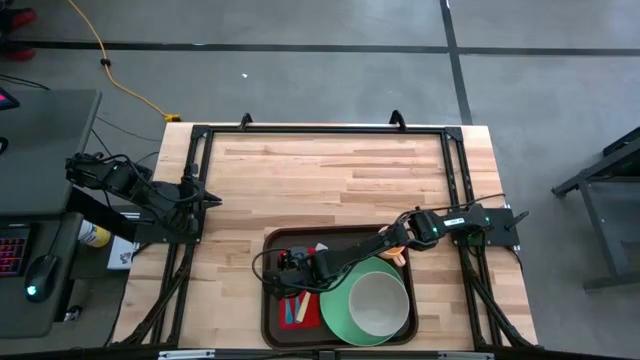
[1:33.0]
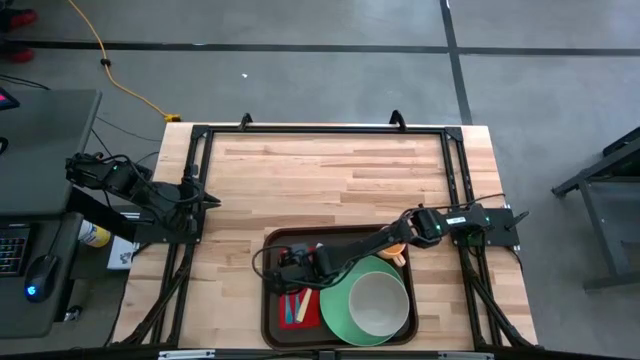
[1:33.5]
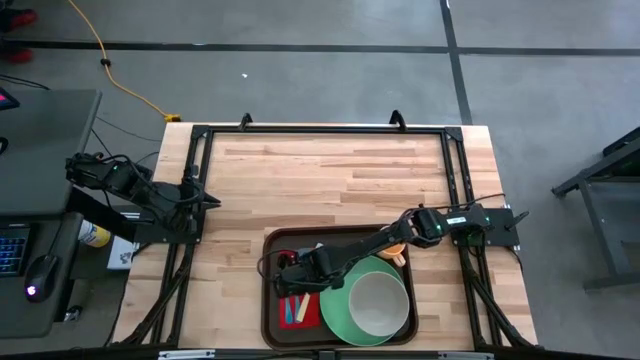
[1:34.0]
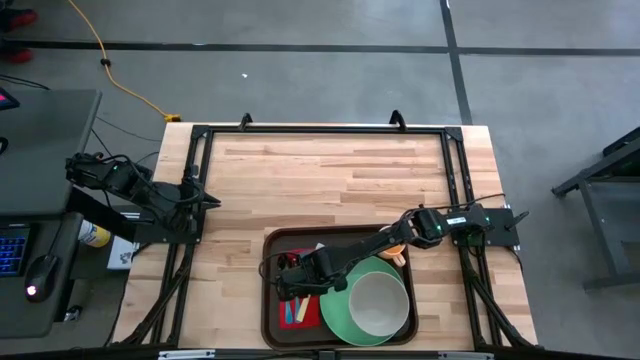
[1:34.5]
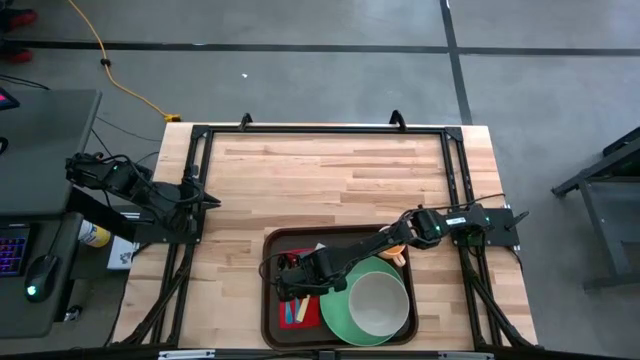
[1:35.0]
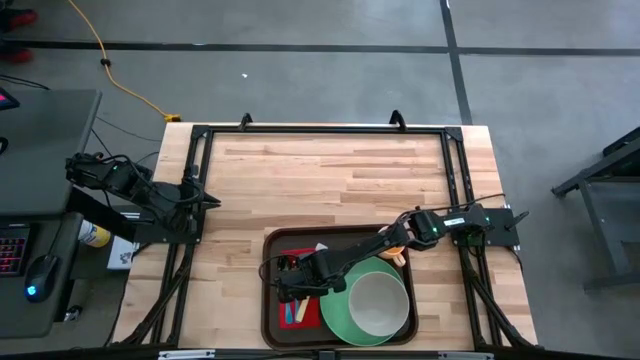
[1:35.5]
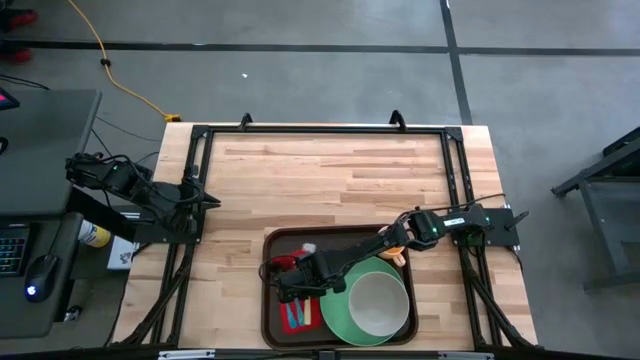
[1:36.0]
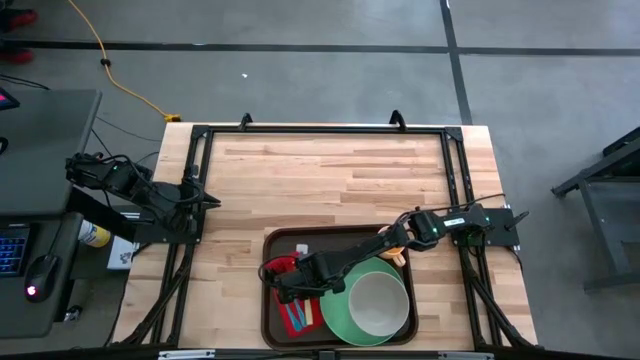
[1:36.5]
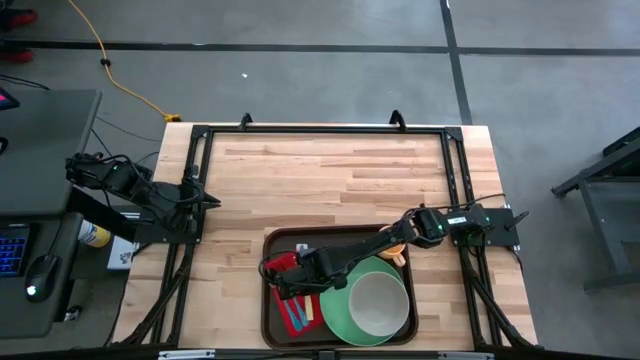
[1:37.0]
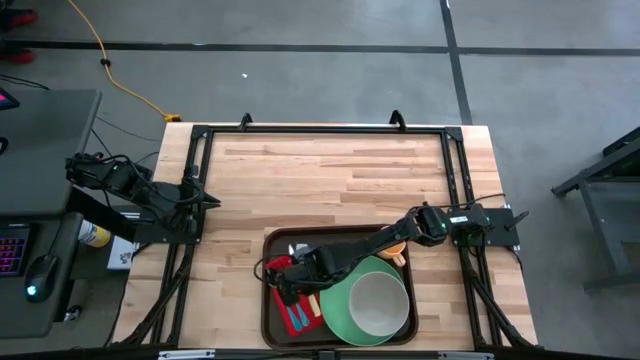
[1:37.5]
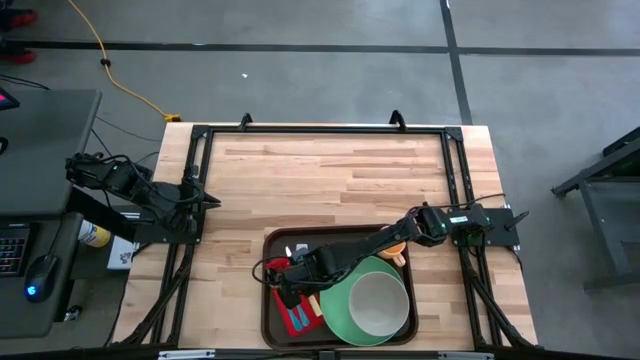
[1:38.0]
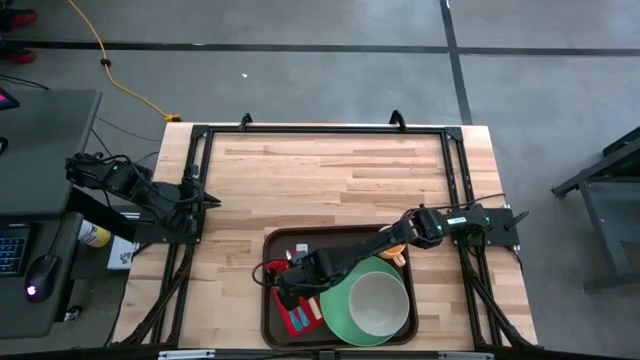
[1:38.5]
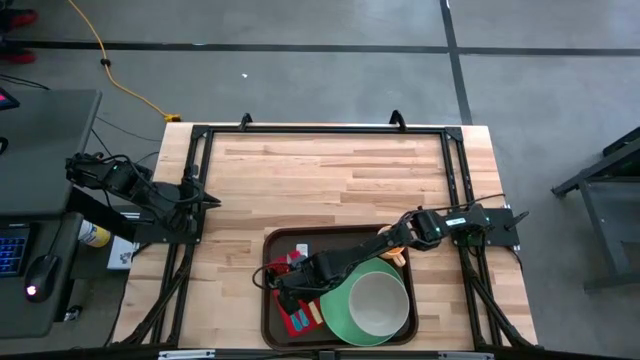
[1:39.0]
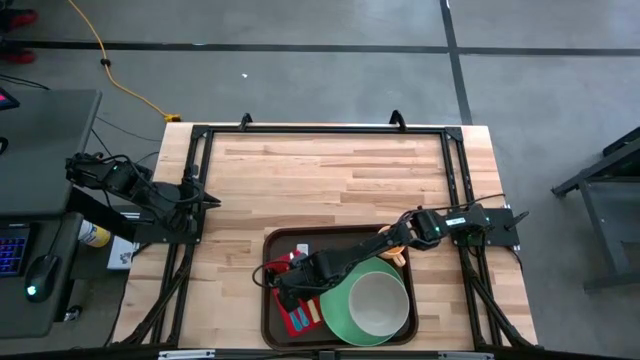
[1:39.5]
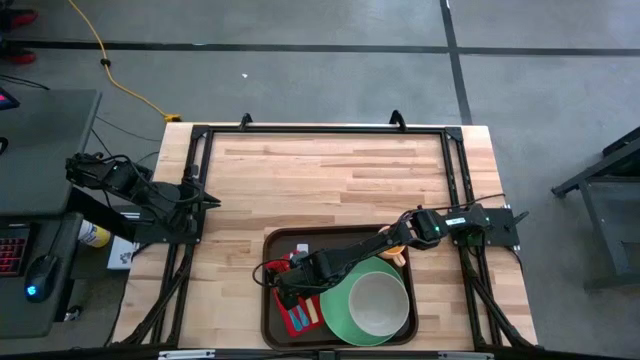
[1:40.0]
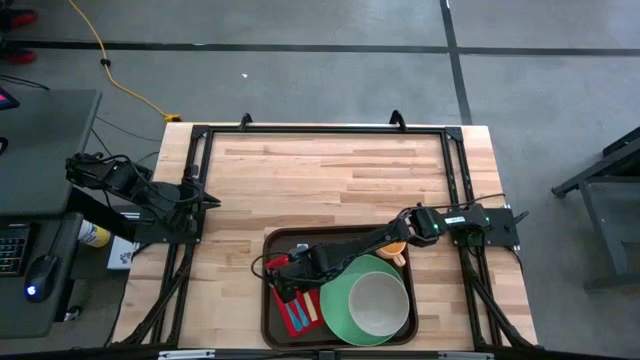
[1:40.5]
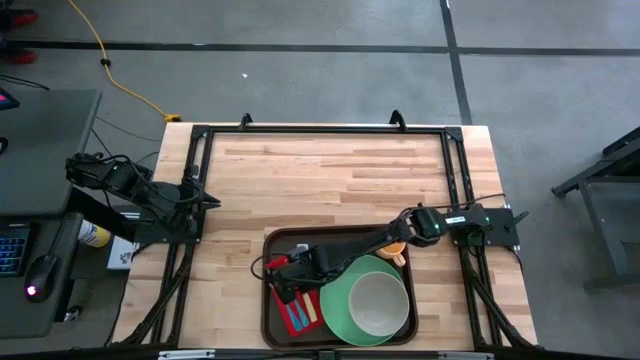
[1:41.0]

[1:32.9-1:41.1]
Task: Set up tray
Adjust the yellow knife on the red napkin

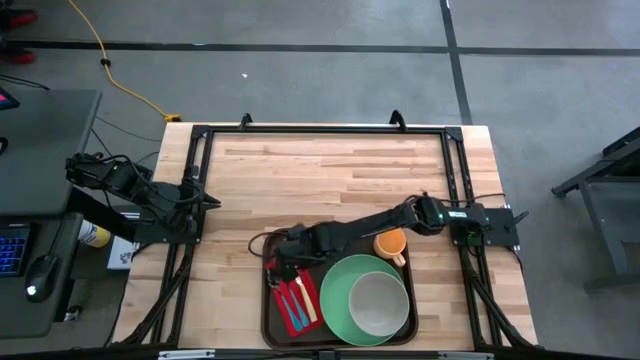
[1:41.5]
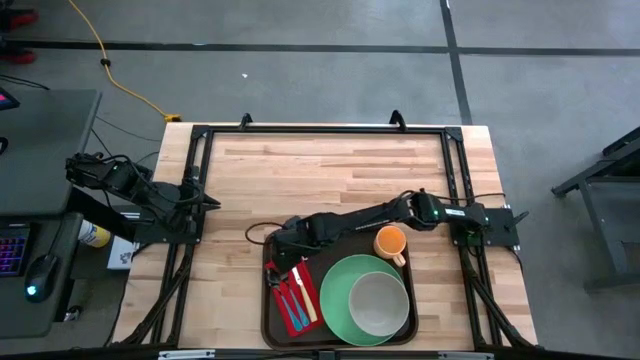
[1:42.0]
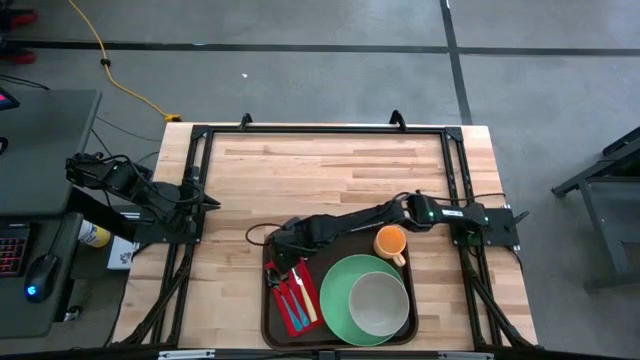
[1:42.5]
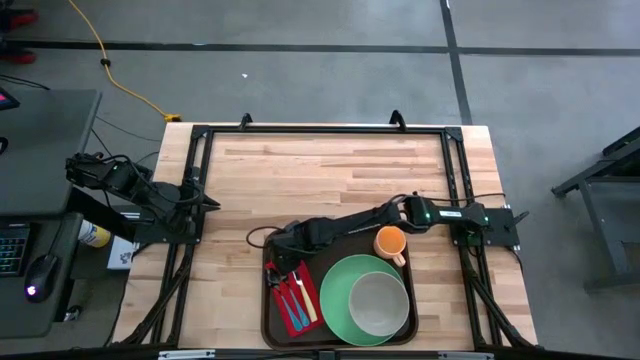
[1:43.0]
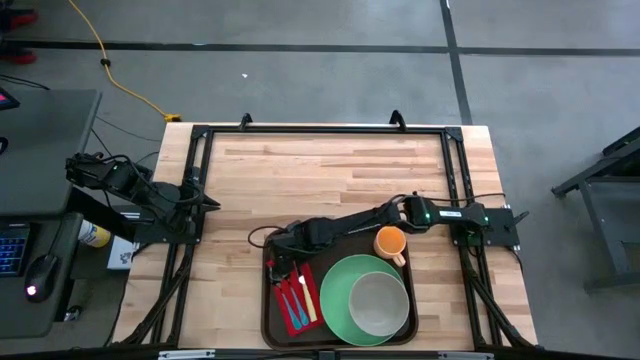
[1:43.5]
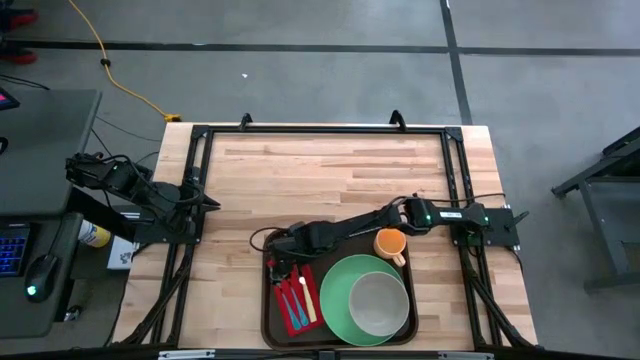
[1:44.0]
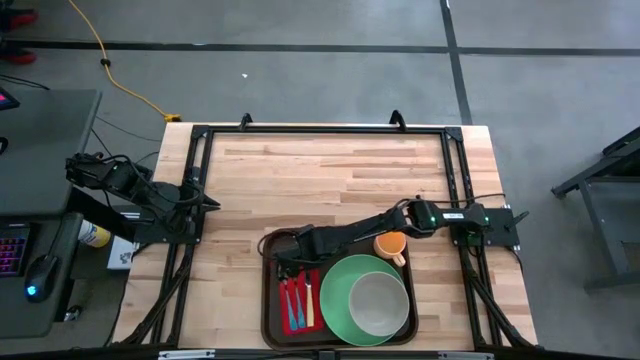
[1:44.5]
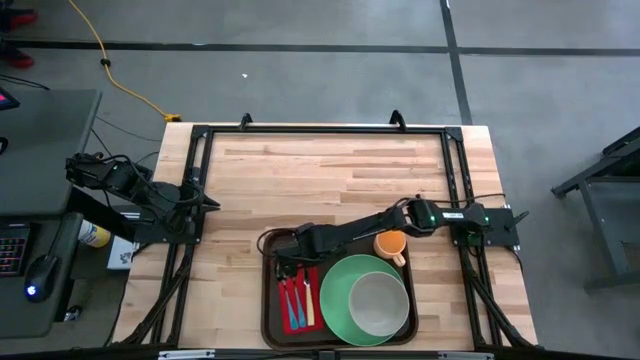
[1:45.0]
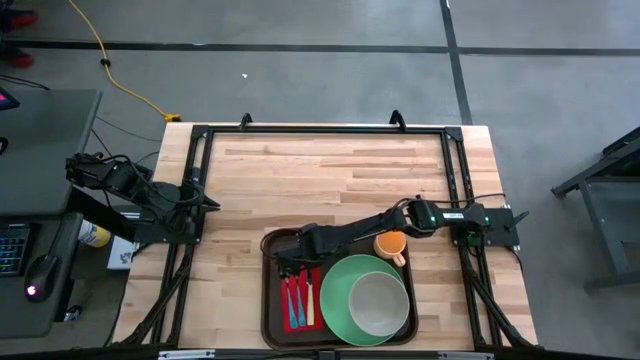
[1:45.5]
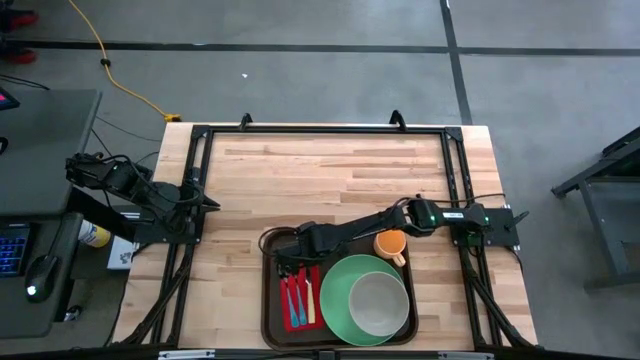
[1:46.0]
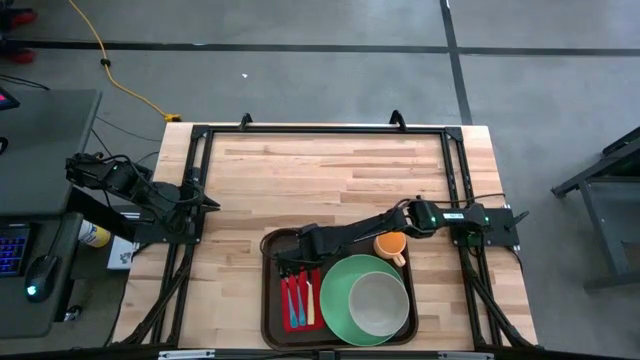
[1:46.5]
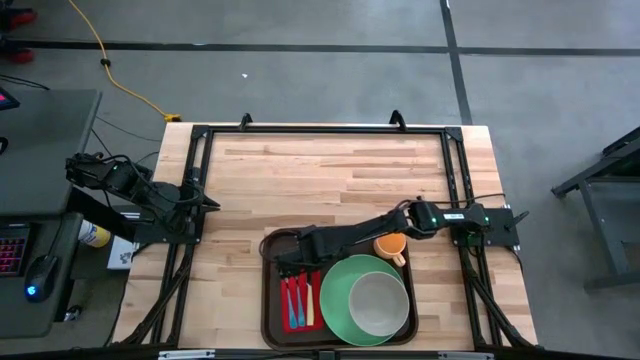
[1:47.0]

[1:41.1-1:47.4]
Adjust the red napkin

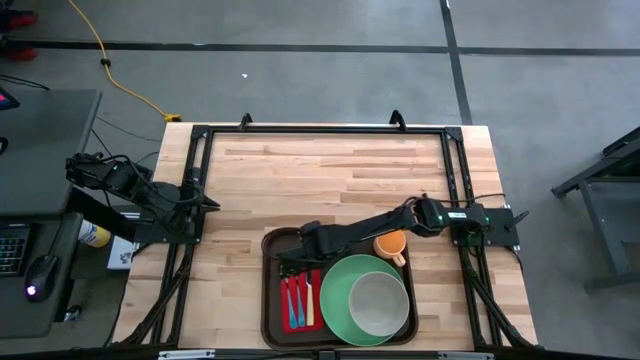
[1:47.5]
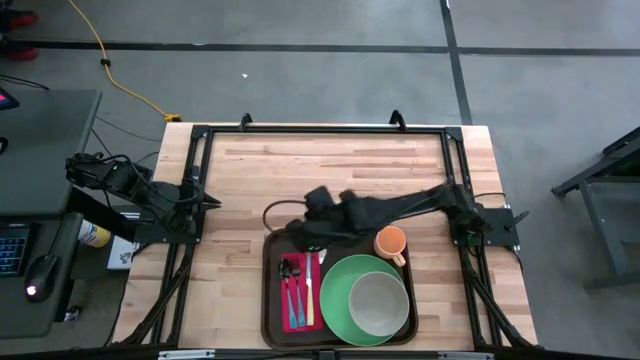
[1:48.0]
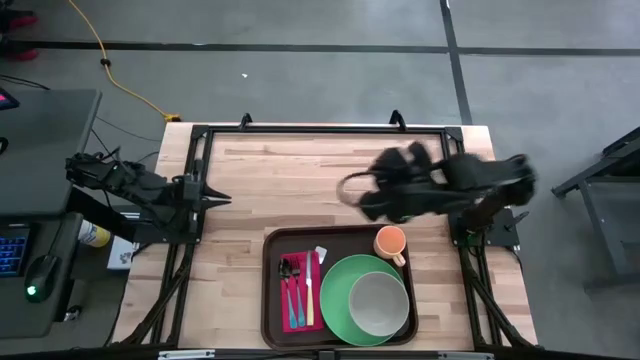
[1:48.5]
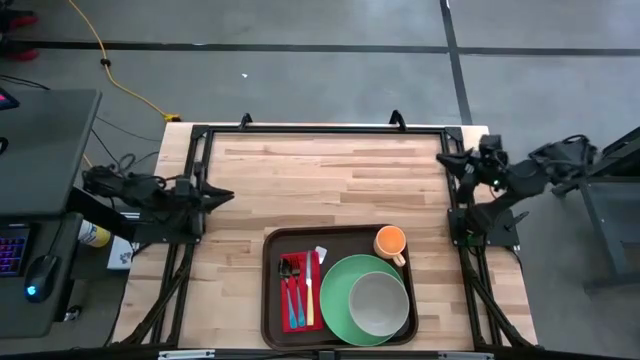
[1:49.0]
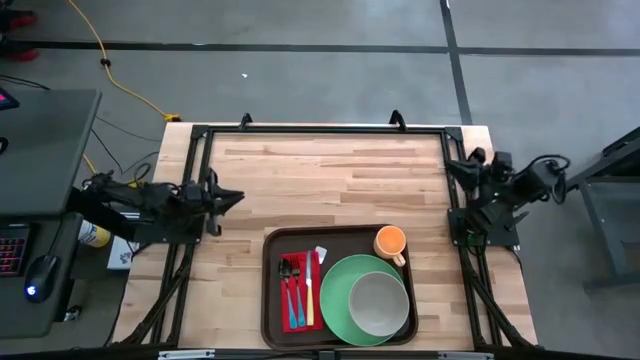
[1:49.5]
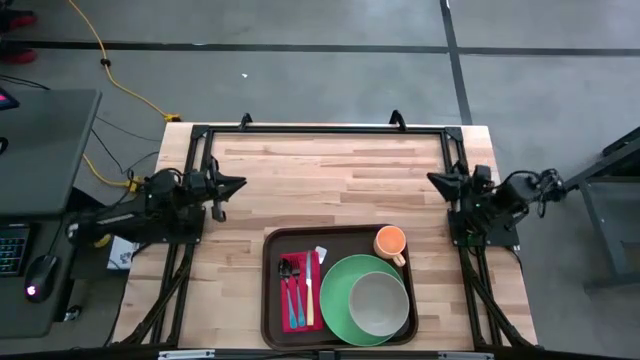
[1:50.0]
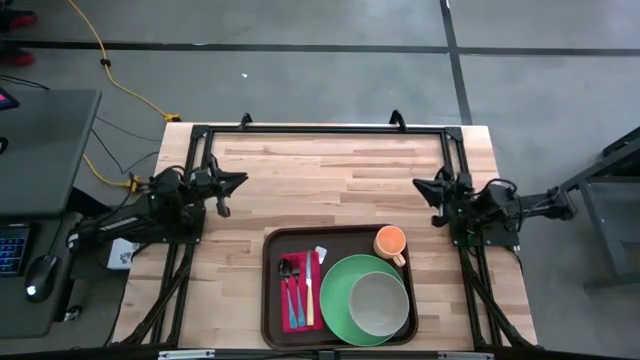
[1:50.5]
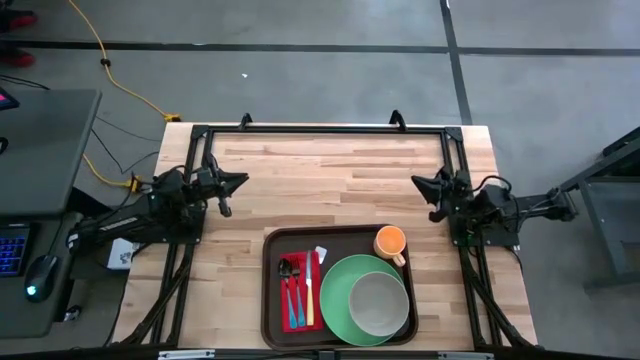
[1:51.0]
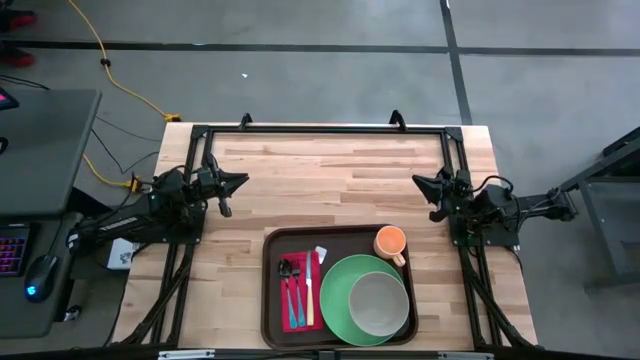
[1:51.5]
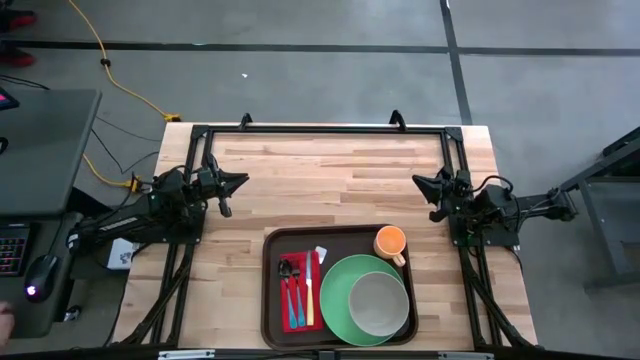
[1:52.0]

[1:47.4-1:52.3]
Return to Home Position
